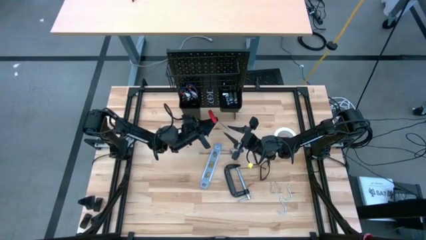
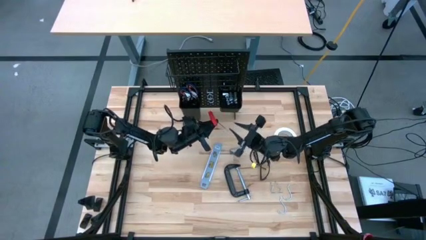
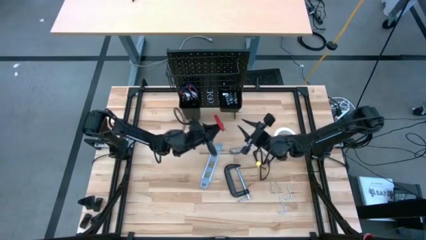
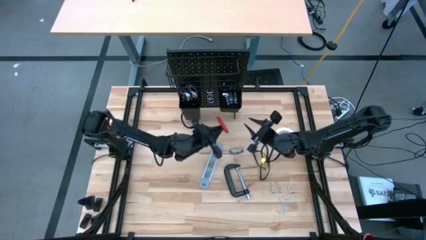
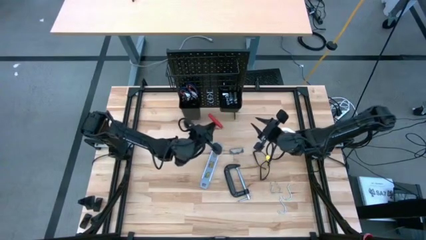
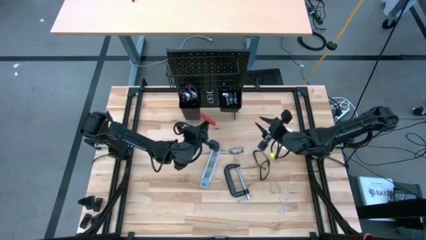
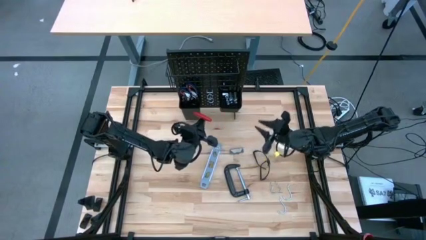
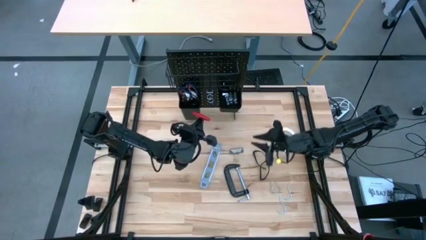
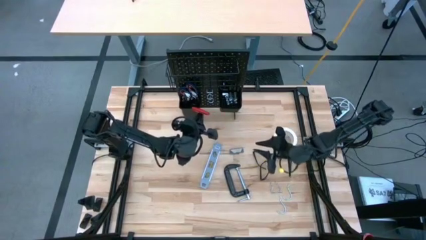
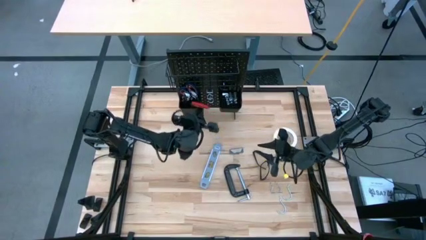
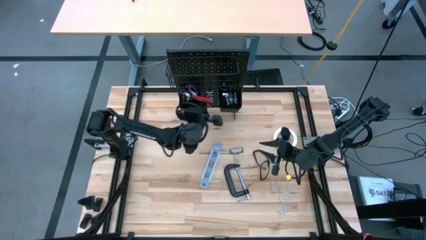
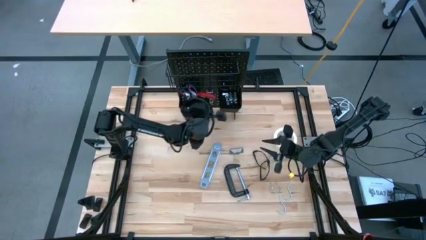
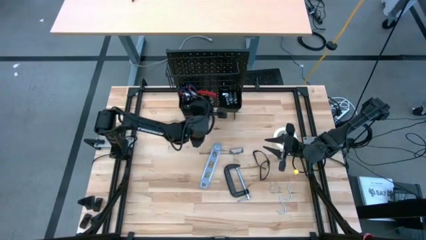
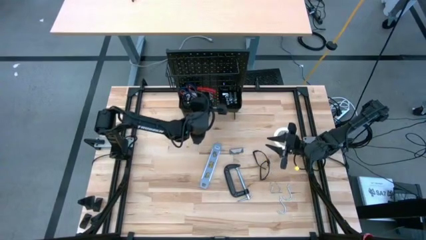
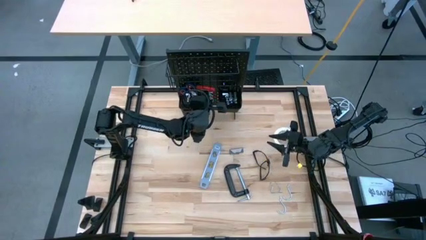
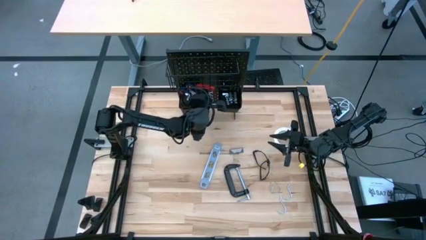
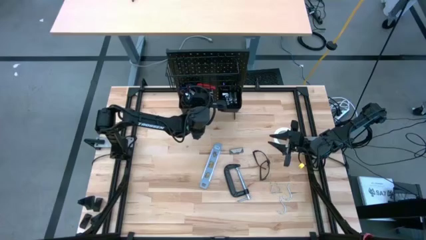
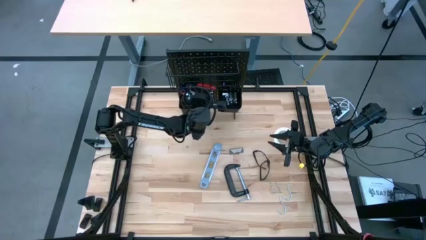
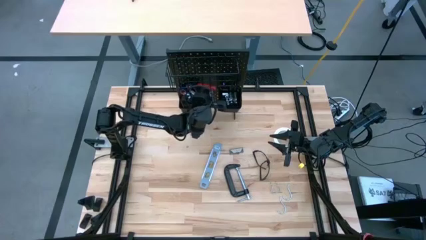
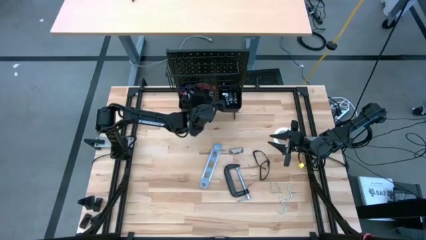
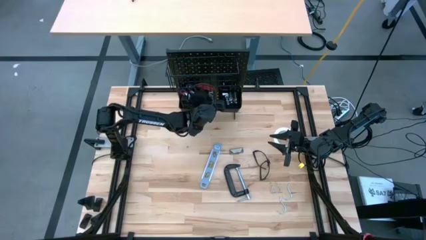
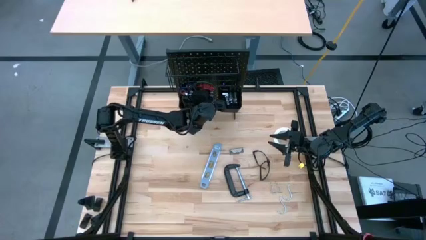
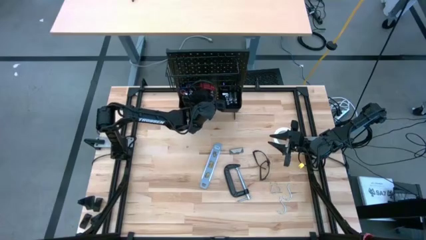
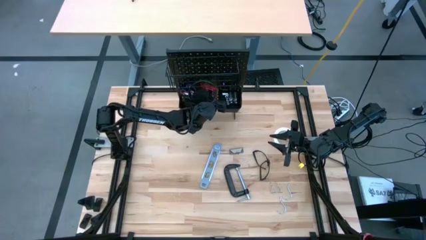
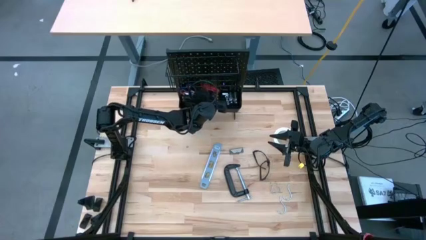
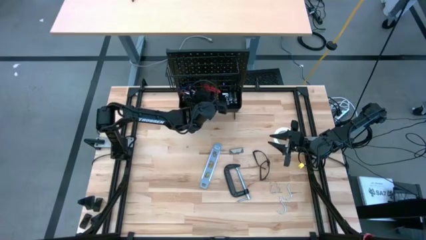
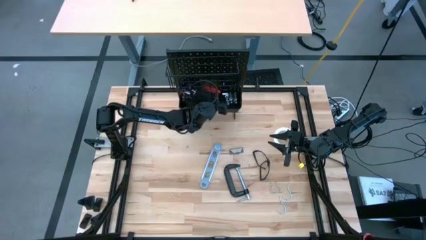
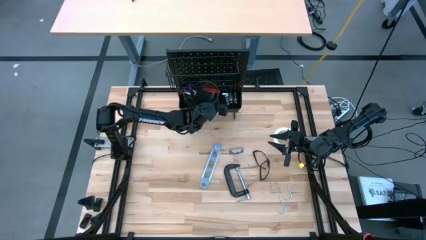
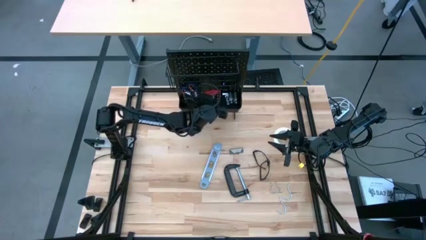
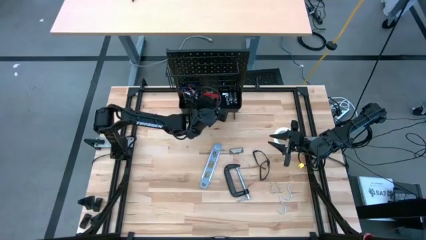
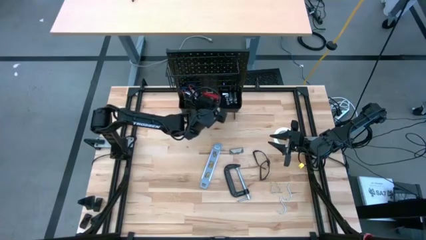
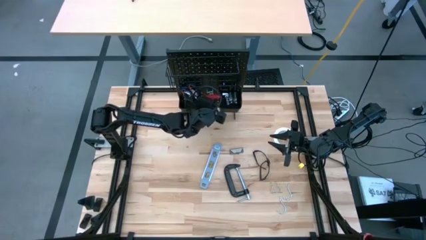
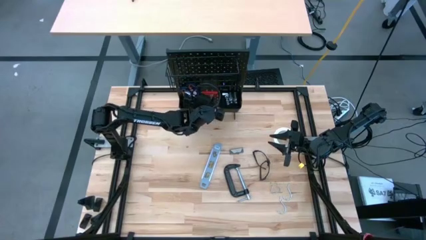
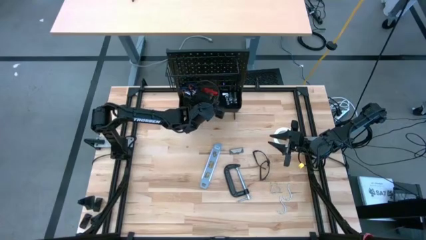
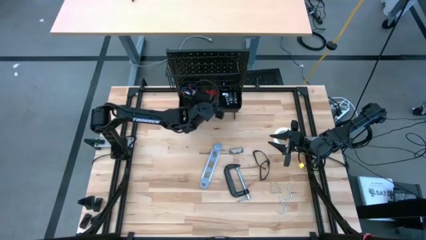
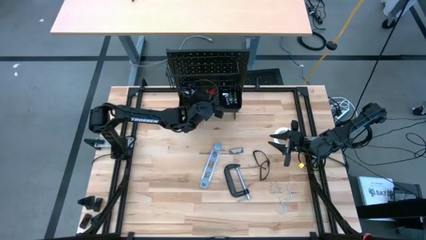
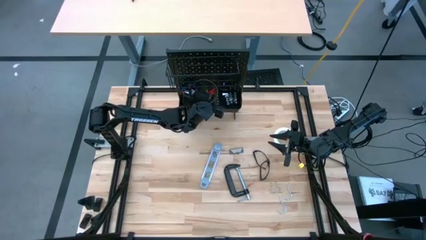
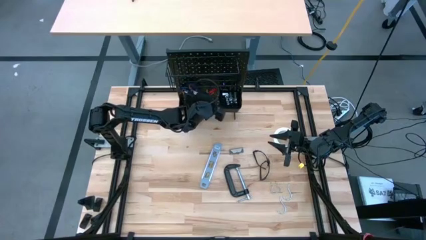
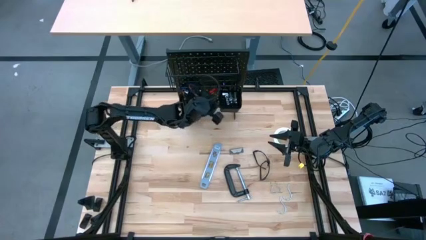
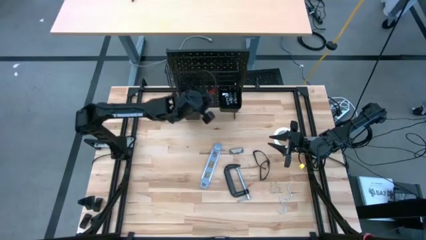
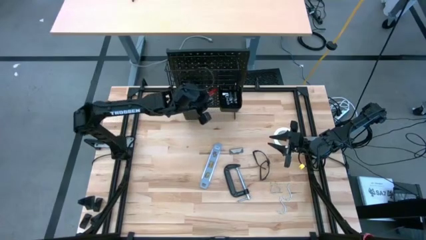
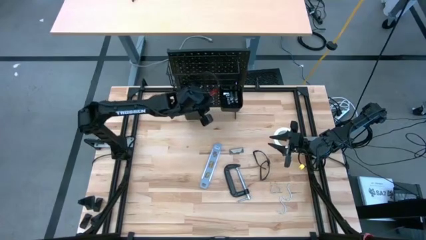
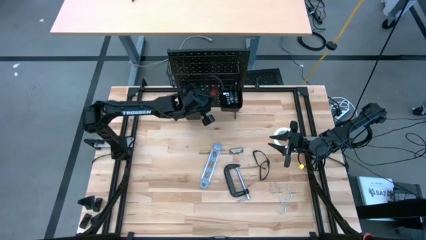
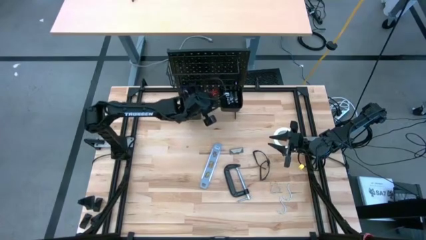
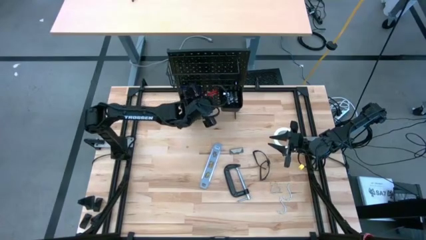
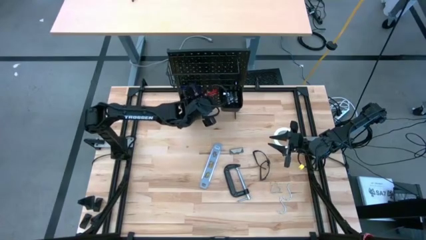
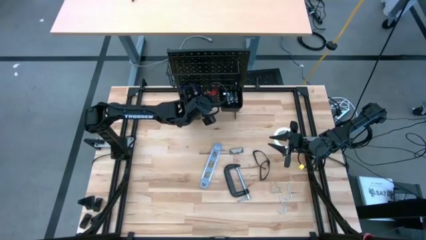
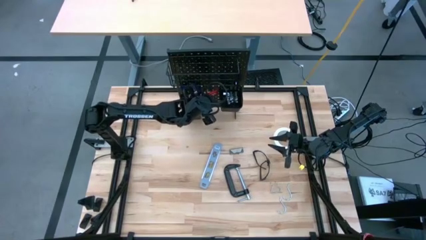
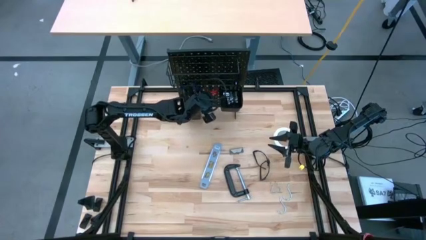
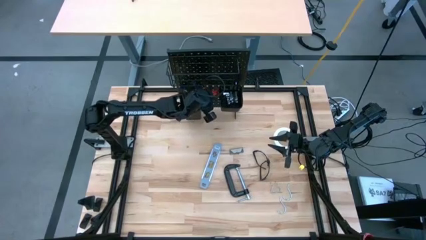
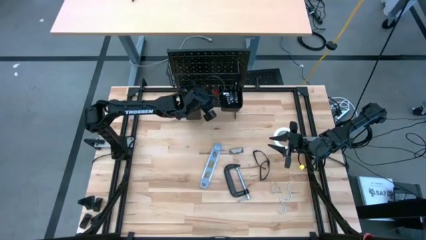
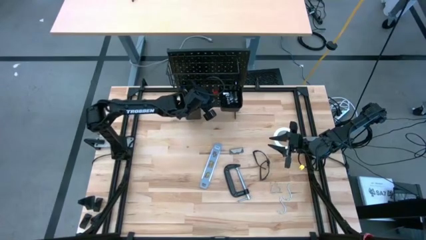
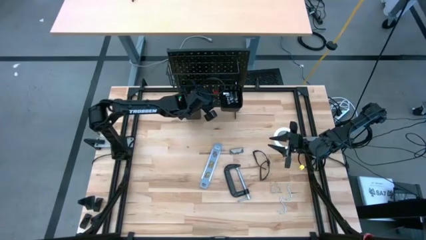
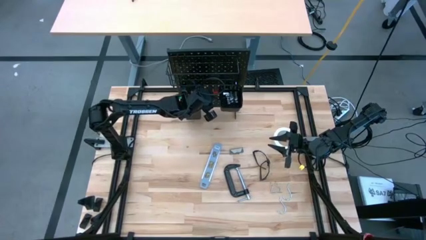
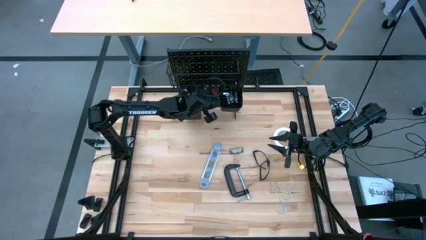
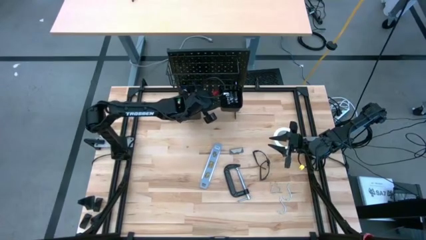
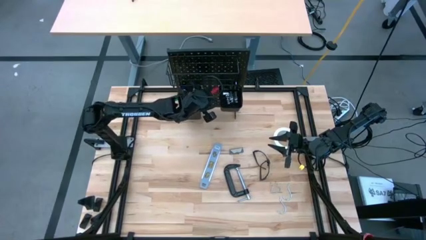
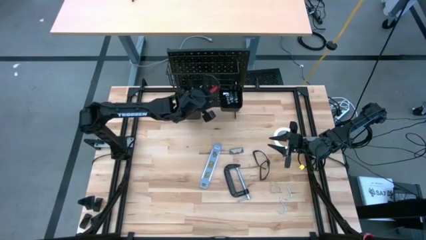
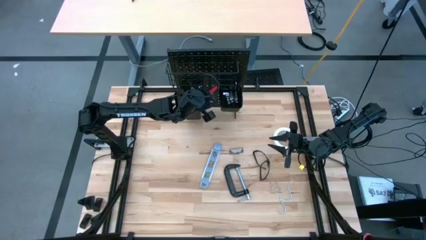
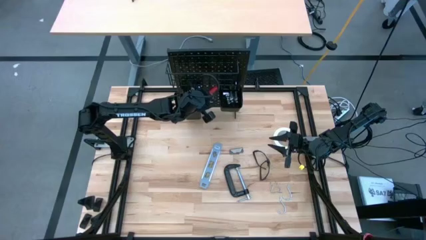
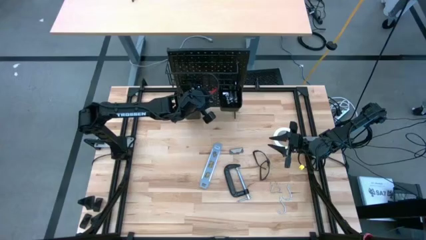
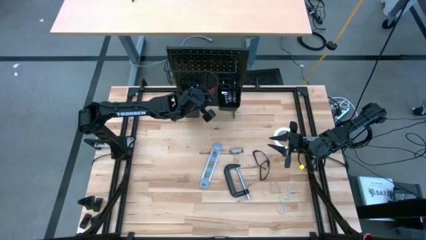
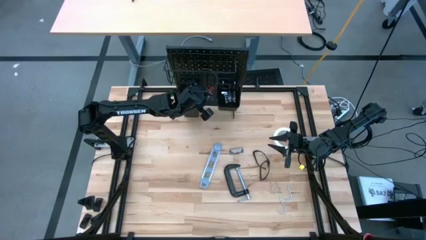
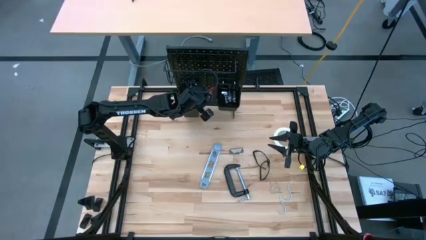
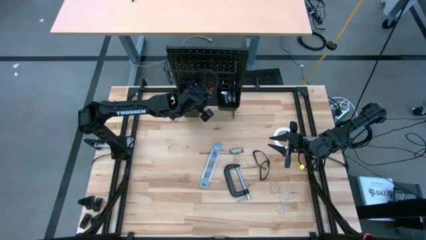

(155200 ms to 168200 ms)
Task: Hang tools onto peg board
Hang the red allen wrench on the peg board
